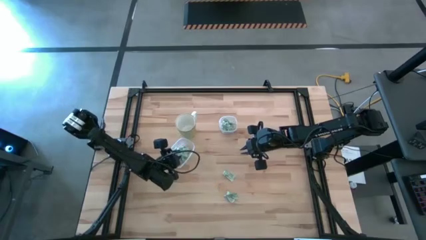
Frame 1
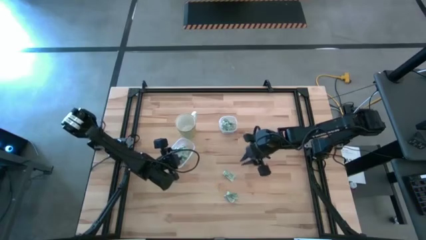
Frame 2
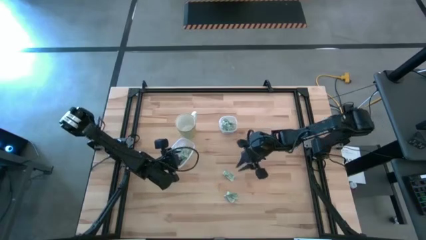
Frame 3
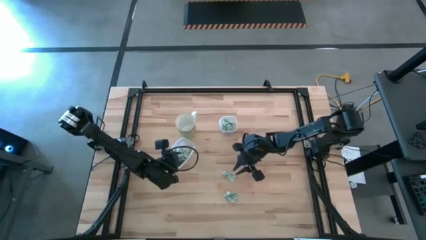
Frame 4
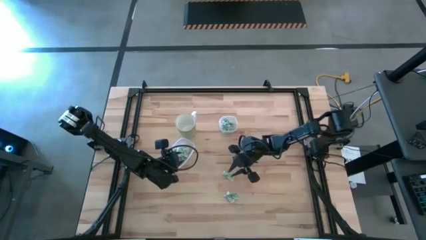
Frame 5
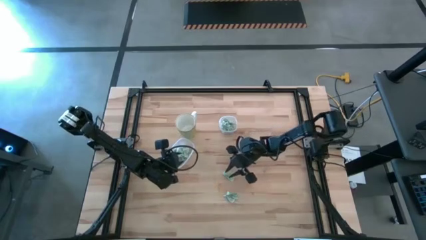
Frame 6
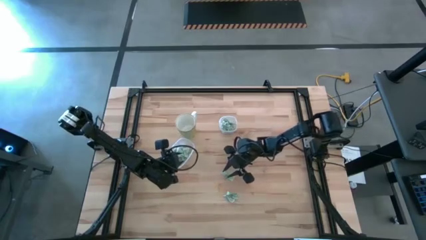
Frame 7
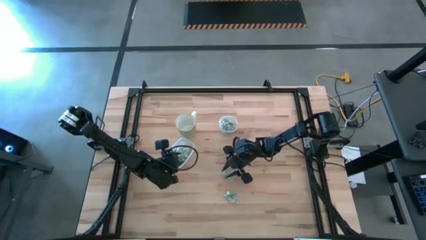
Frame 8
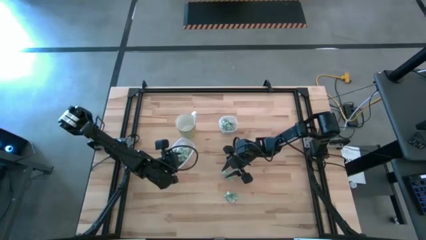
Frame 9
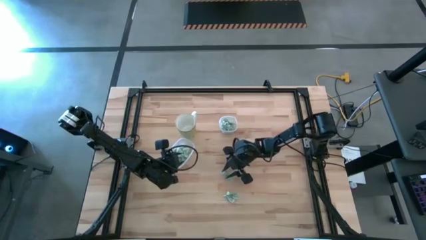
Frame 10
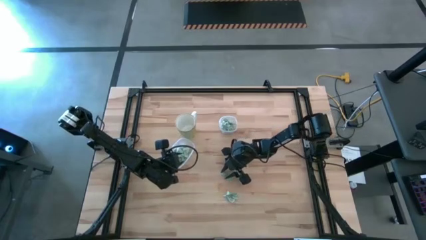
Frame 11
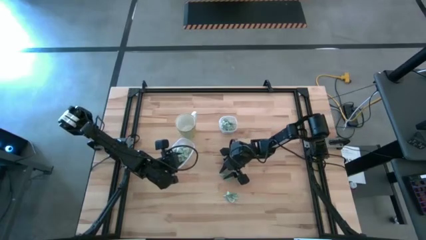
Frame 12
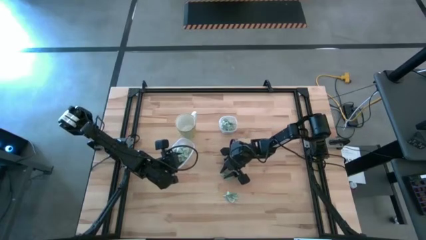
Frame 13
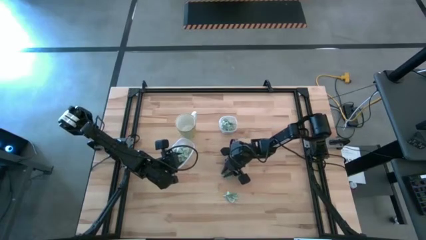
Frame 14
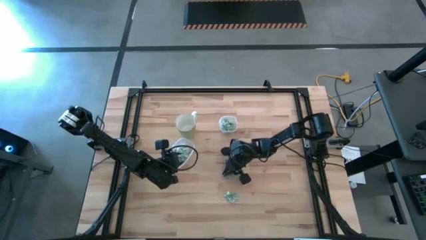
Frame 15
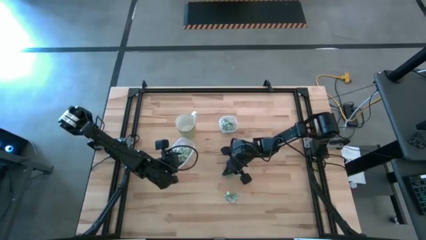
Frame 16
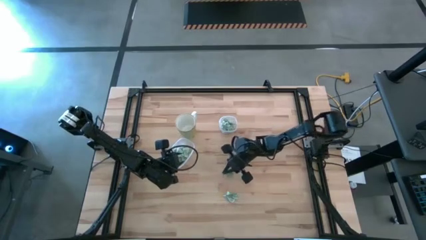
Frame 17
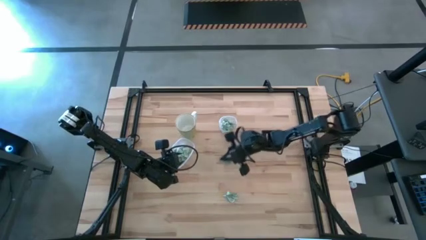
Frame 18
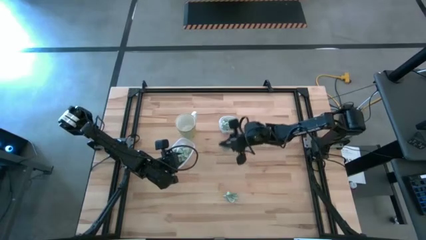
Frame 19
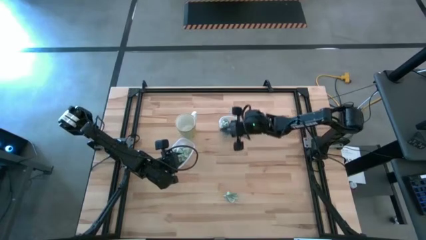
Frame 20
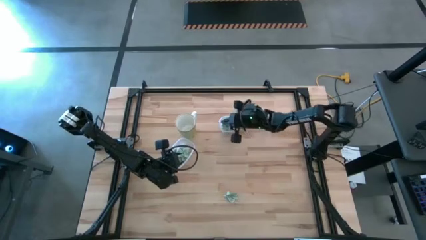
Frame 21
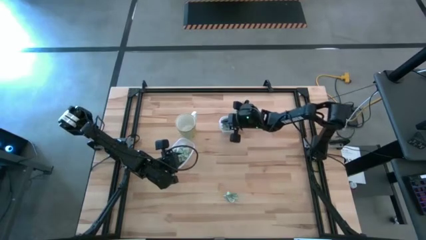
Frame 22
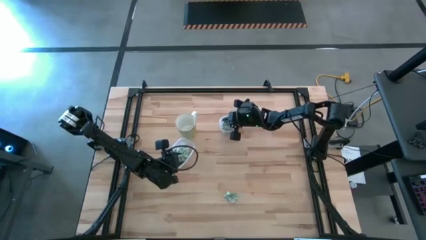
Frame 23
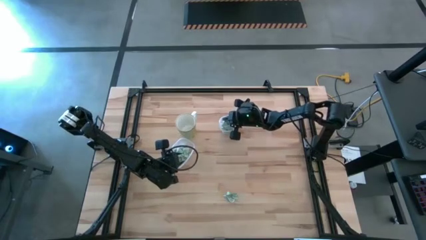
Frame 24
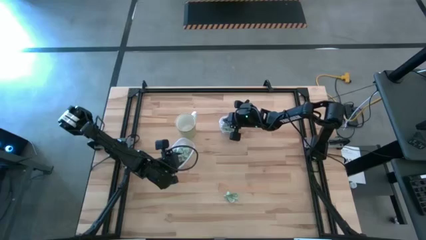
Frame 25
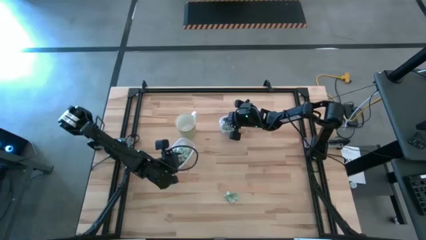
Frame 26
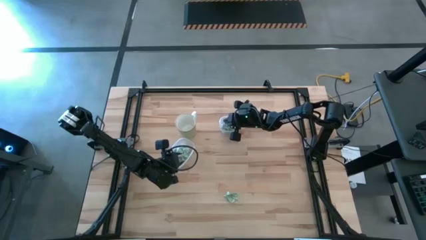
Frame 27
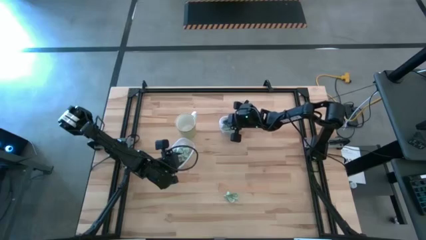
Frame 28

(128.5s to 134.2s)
Task: Pick and place items into bin
Put the stevia packet into the top transparent bin

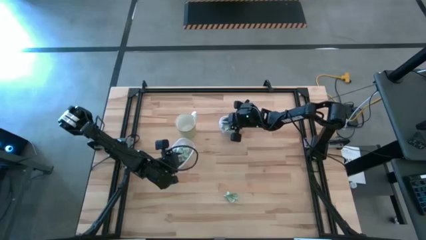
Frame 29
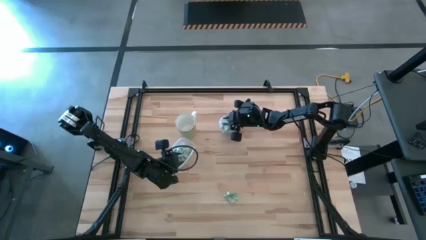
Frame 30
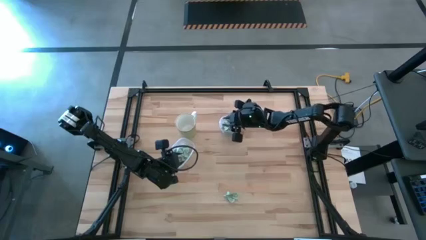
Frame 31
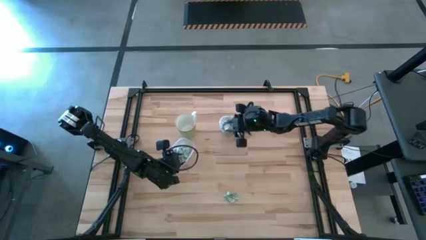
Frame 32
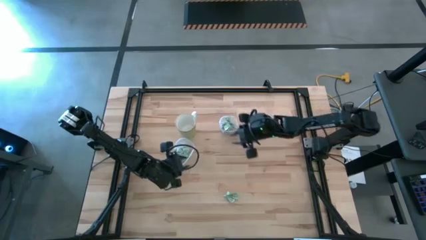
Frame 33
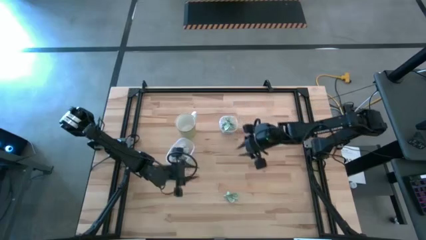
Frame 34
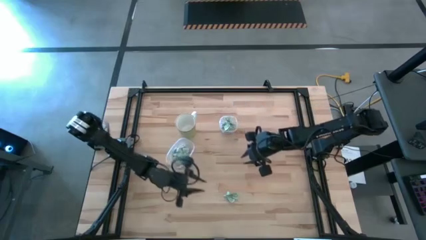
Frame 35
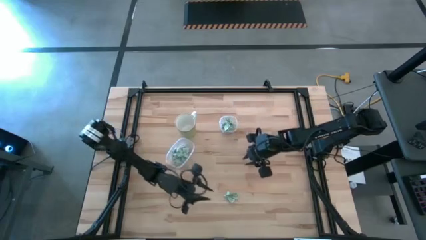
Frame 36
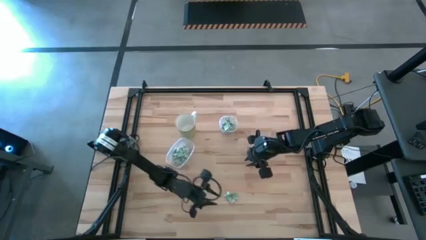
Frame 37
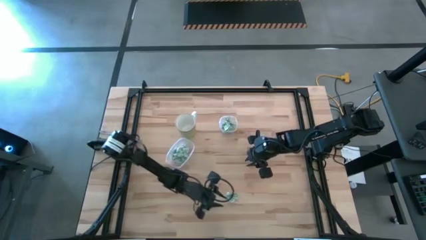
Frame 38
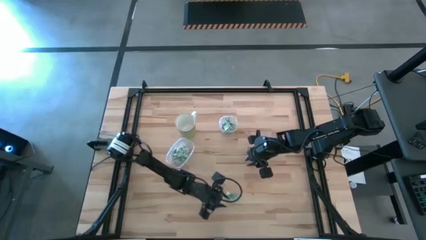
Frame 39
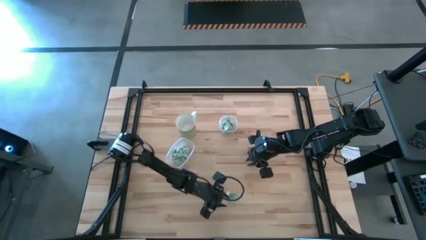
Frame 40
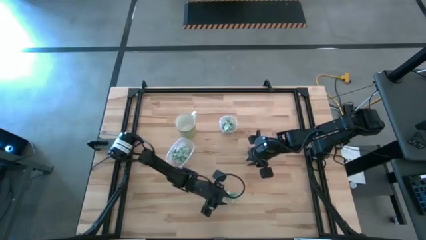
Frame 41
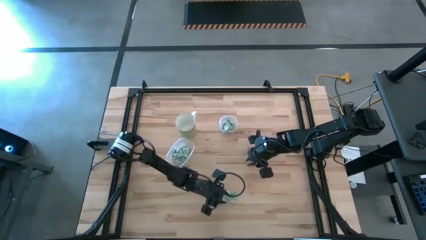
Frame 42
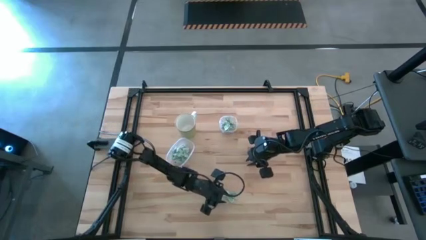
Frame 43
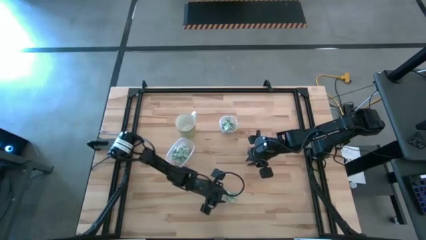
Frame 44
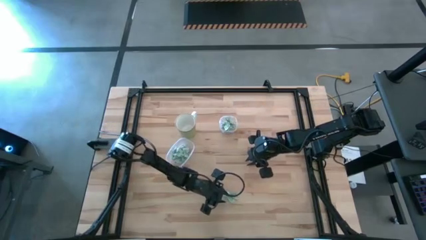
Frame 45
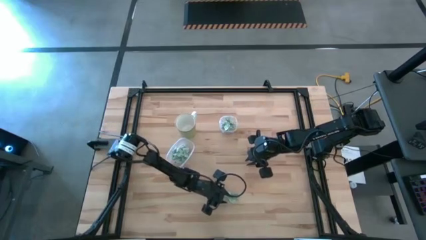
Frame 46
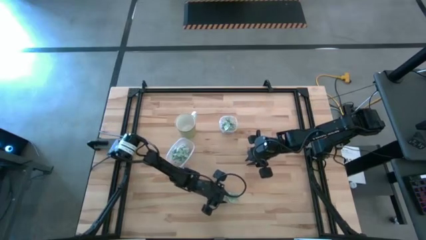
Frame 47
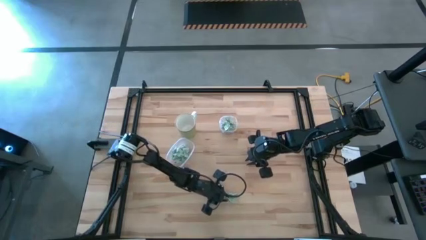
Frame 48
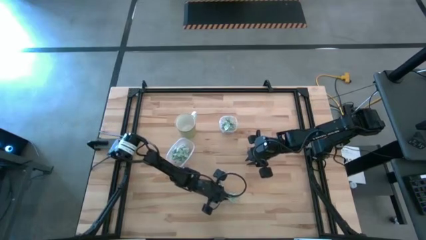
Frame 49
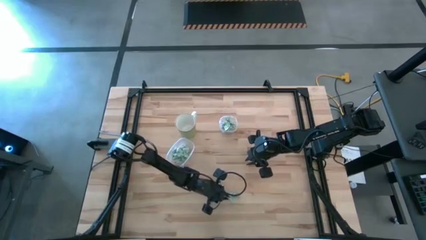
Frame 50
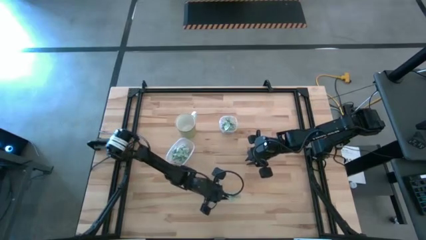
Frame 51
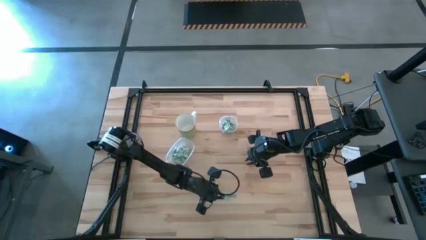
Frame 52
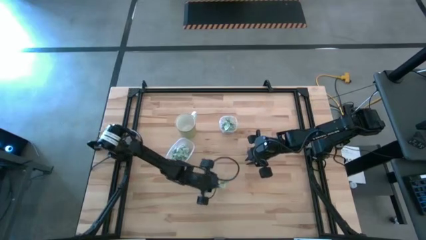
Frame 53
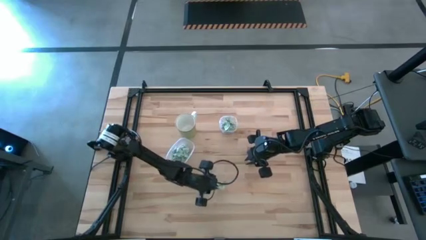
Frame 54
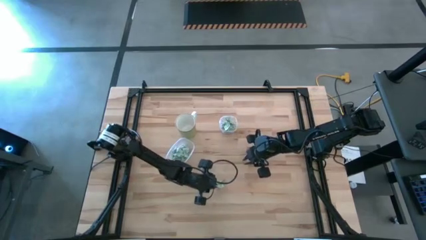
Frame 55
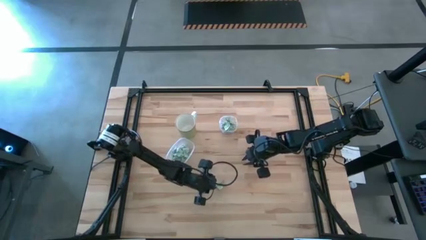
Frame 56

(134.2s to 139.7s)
Put the stevia packet into the bottom transparent bin

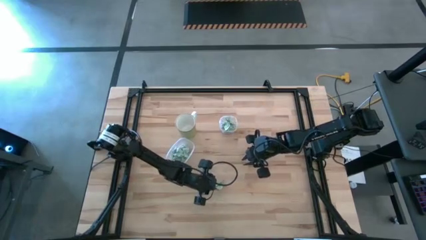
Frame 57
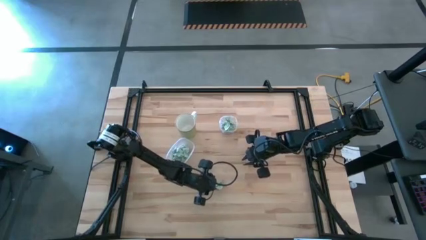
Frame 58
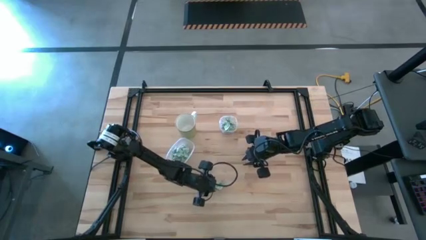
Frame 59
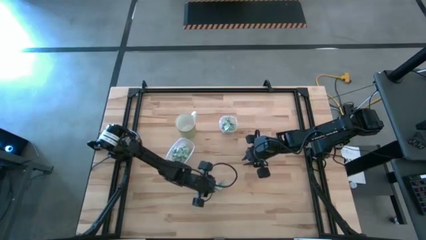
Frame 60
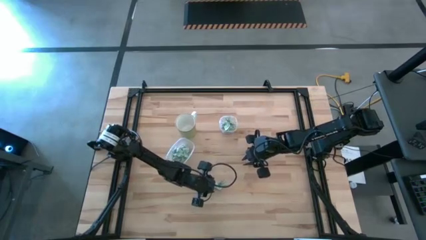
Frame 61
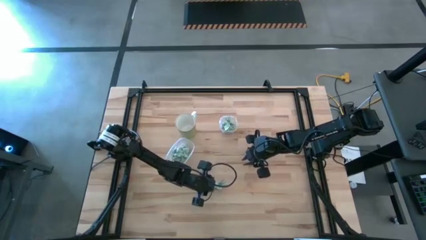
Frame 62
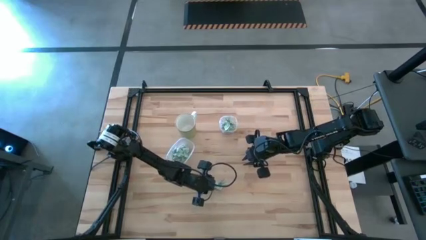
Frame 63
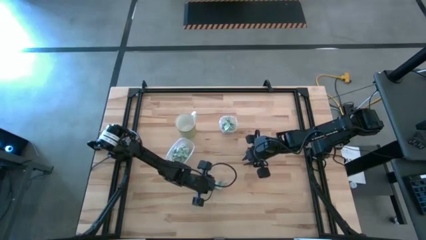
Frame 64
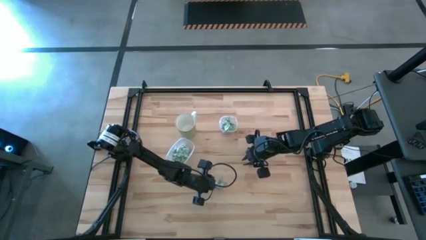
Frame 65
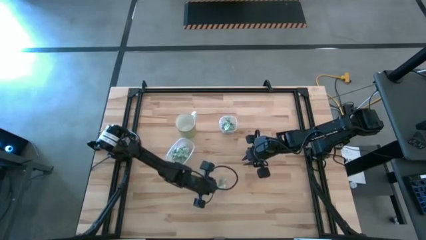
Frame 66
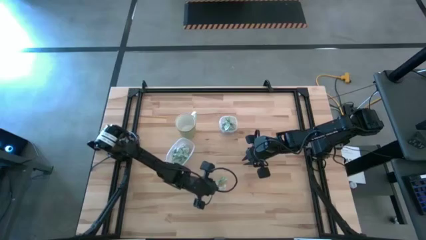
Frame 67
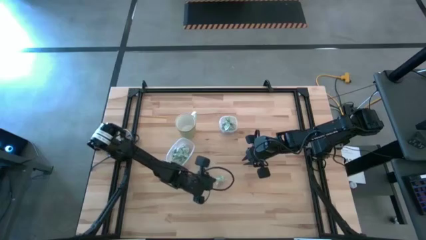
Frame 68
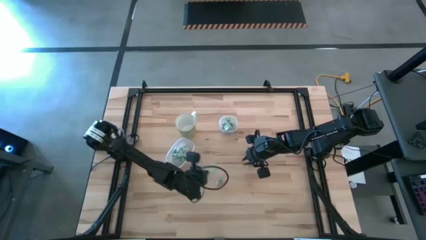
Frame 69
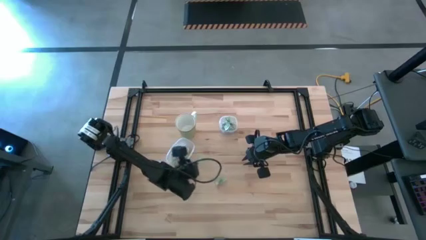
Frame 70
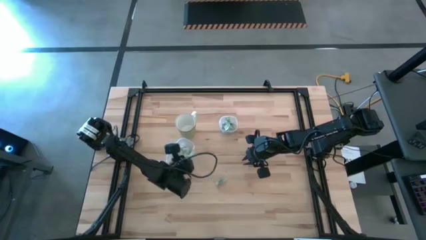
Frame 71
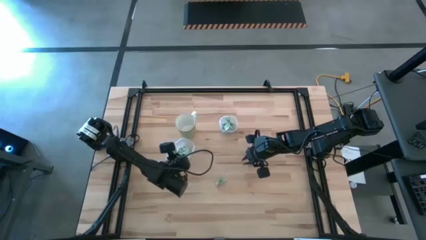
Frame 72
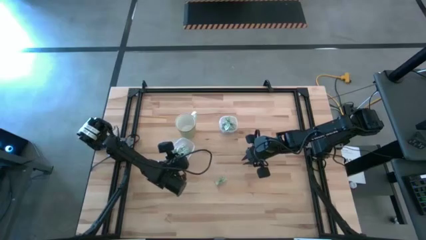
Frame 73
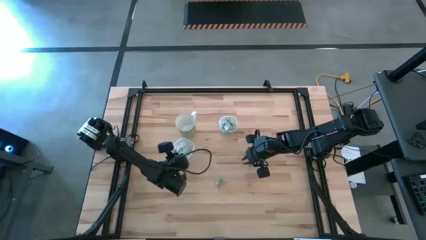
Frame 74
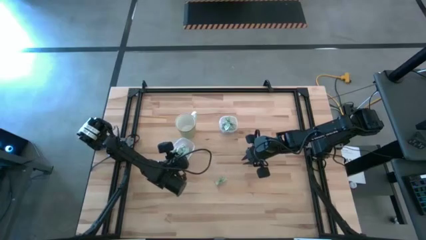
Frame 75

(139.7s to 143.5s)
Put the stevia packet into the bottom transparent bin

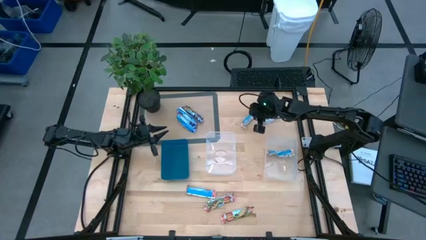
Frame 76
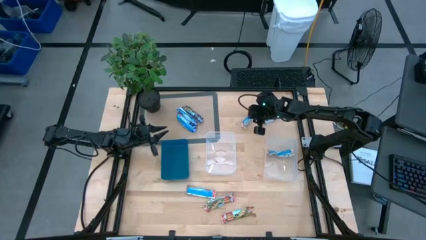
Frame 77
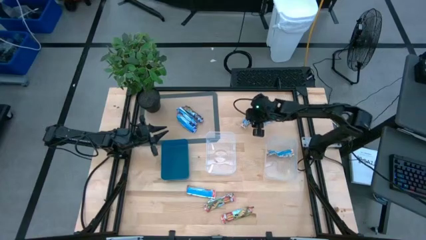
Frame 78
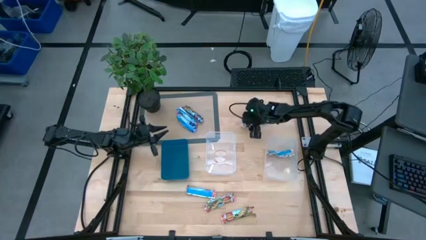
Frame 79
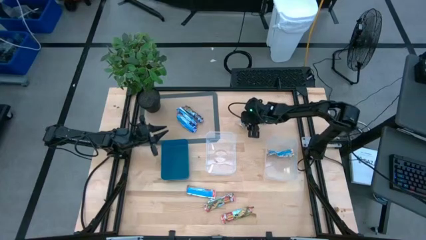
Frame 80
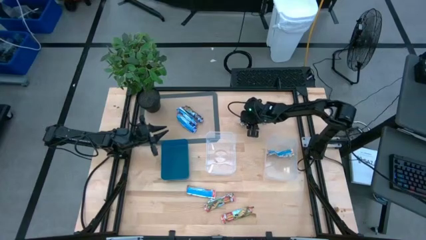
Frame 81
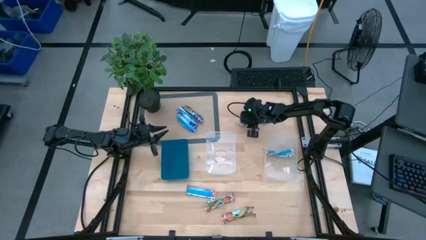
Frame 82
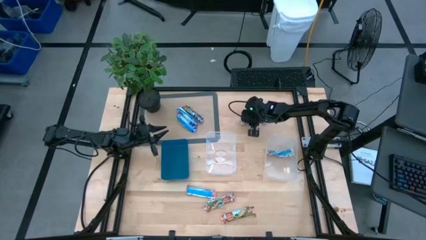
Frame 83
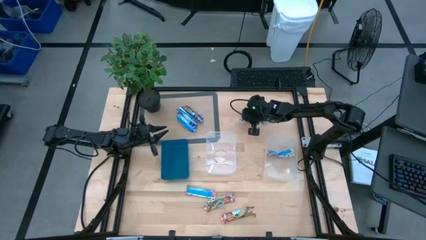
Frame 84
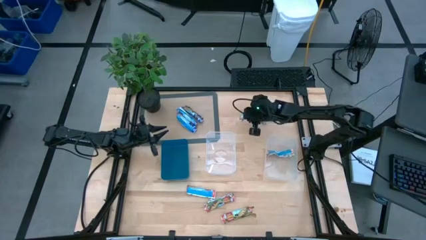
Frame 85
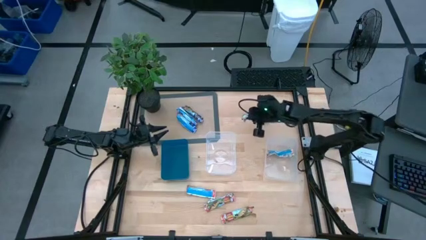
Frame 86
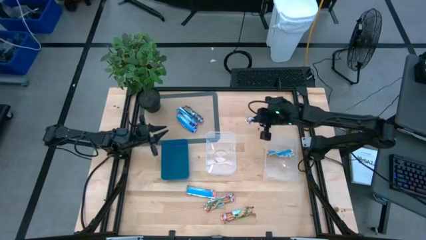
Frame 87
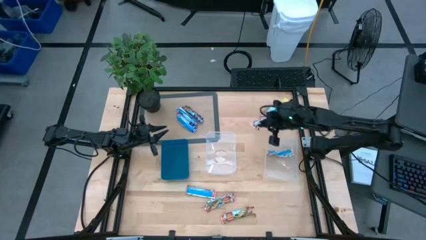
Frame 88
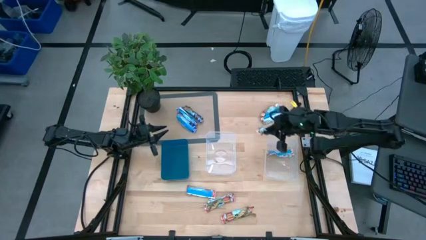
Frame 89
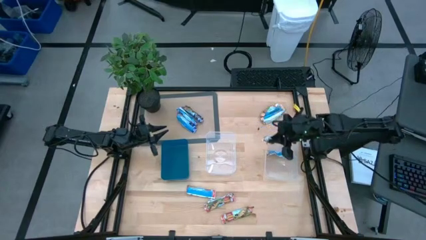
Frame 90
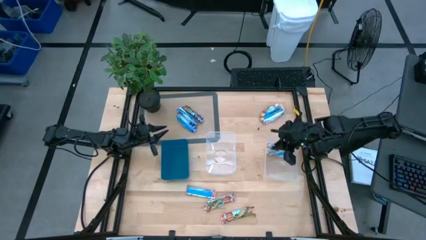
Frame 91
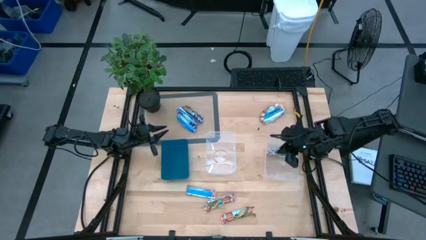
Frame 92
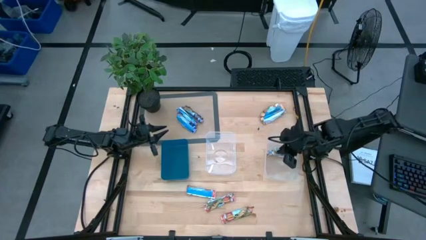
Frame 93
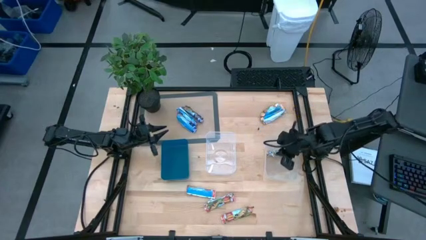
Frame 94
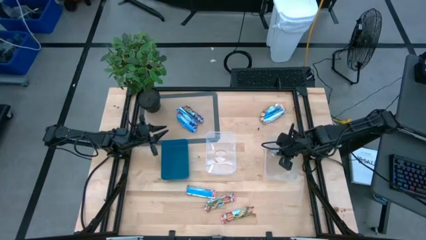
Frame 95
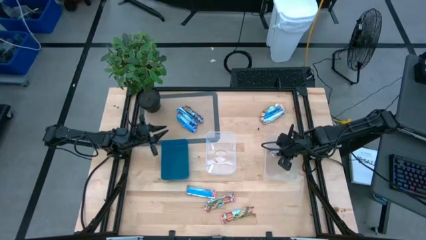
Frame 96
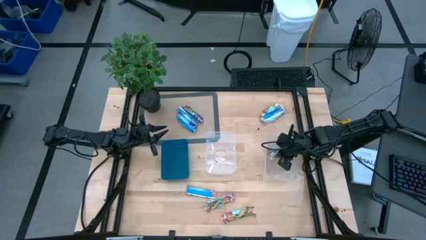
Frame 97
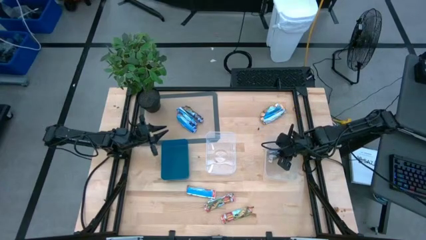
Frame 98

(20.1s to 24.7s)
Task: Pick and place Granola Bars by type
Put the yellow granola bar into the right transparent bin
